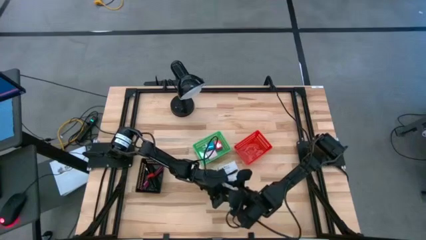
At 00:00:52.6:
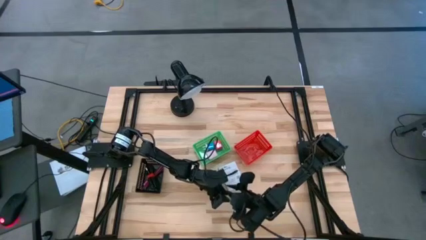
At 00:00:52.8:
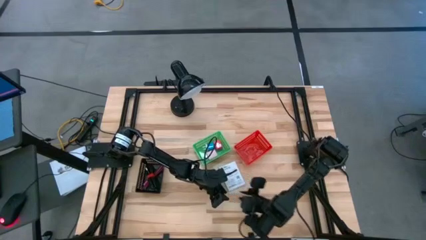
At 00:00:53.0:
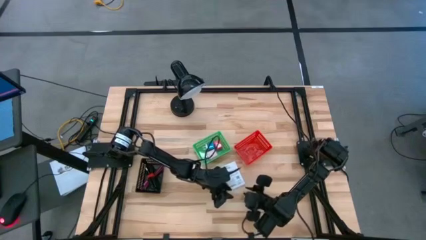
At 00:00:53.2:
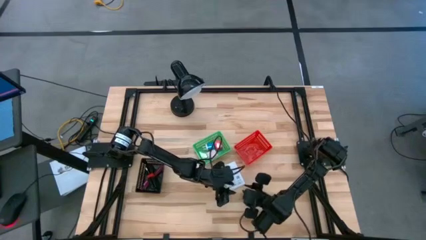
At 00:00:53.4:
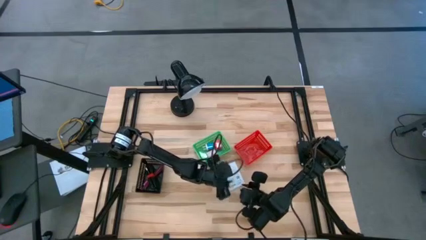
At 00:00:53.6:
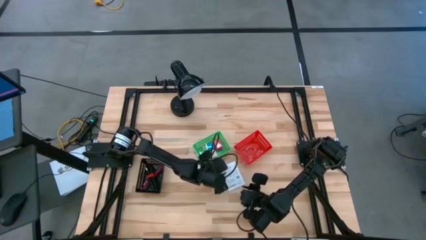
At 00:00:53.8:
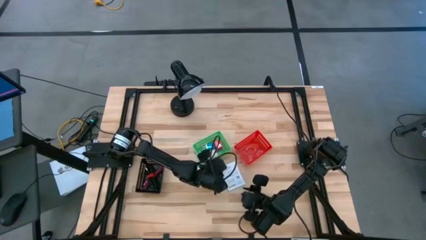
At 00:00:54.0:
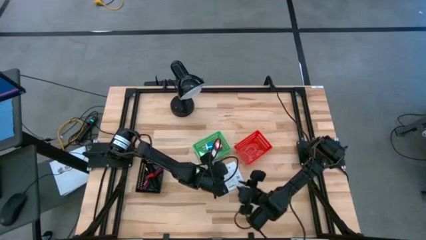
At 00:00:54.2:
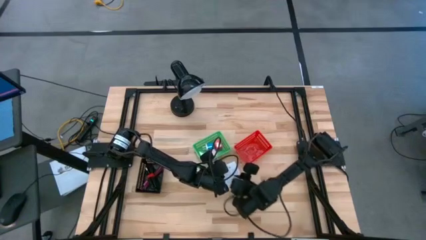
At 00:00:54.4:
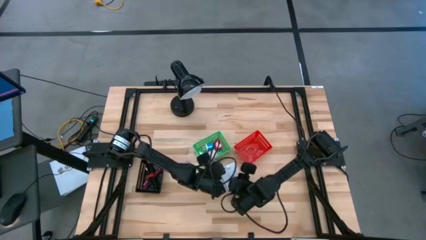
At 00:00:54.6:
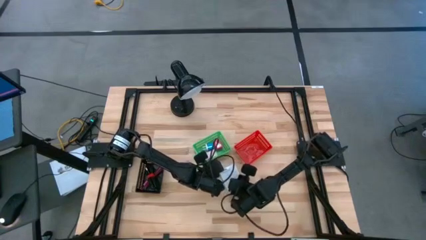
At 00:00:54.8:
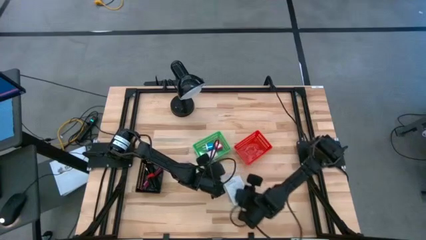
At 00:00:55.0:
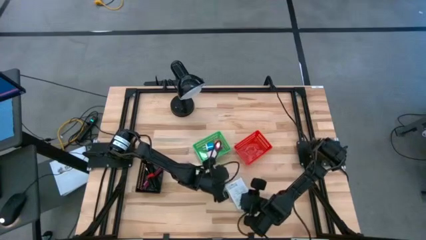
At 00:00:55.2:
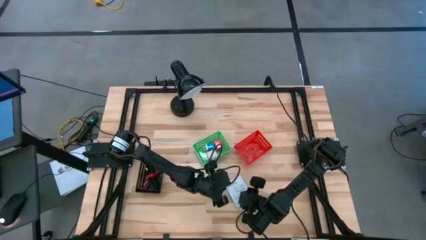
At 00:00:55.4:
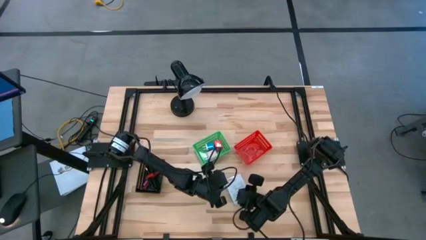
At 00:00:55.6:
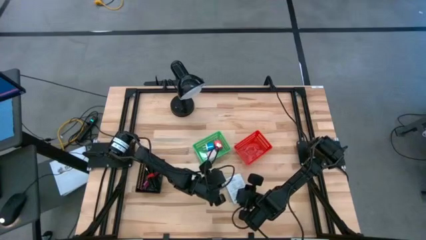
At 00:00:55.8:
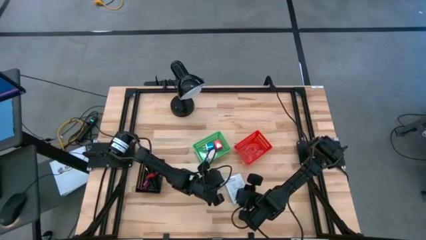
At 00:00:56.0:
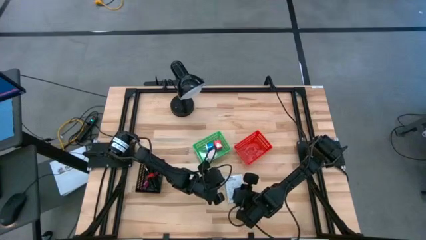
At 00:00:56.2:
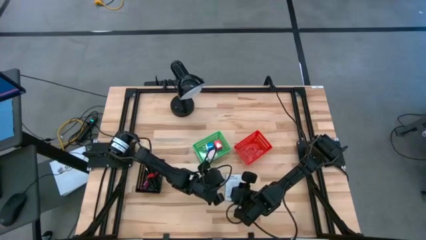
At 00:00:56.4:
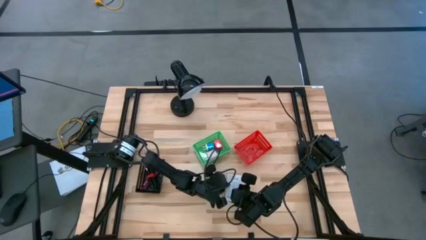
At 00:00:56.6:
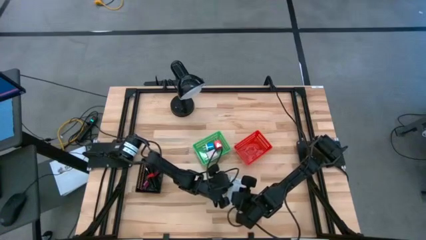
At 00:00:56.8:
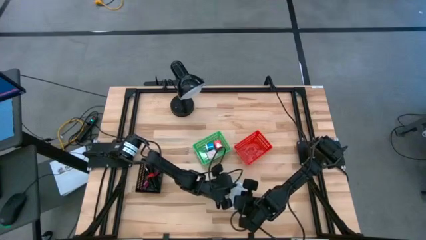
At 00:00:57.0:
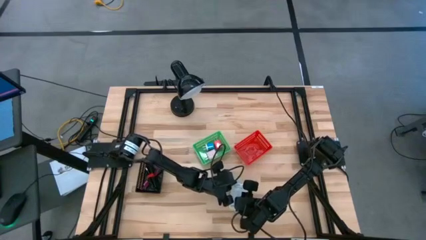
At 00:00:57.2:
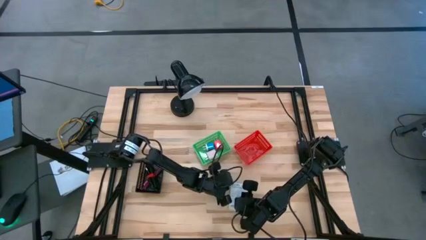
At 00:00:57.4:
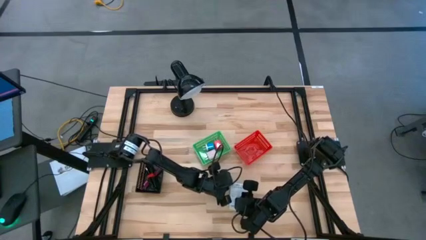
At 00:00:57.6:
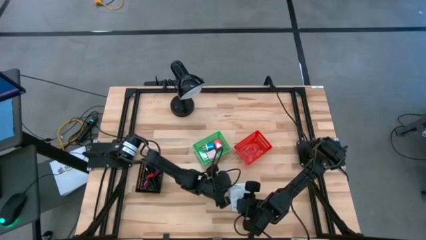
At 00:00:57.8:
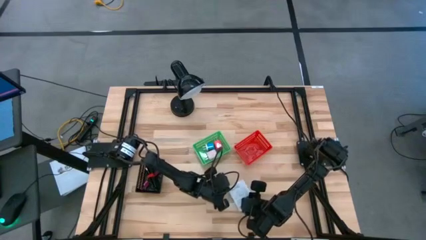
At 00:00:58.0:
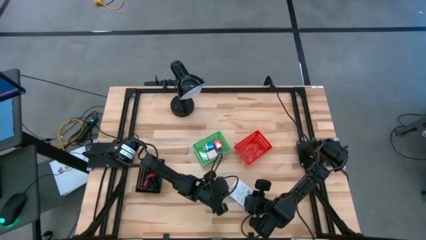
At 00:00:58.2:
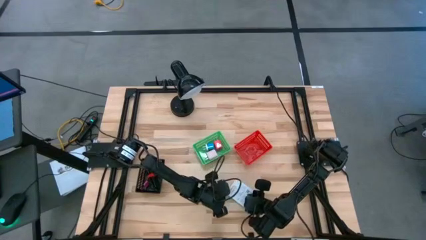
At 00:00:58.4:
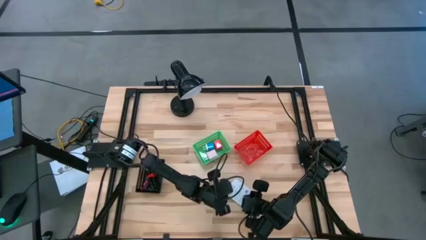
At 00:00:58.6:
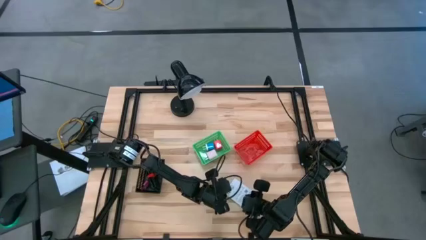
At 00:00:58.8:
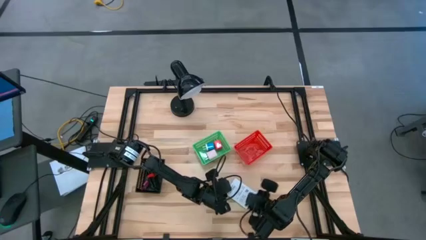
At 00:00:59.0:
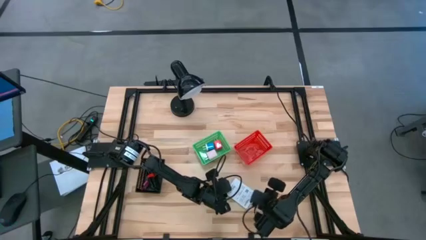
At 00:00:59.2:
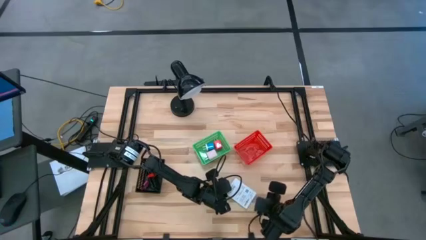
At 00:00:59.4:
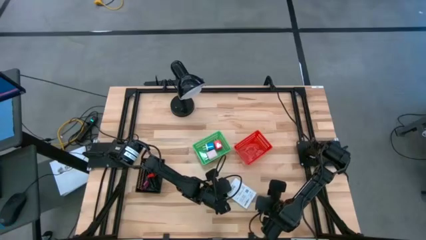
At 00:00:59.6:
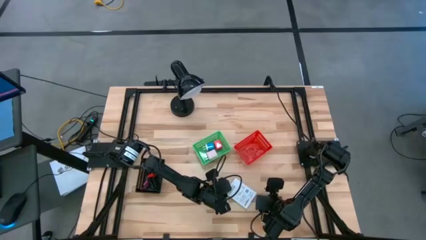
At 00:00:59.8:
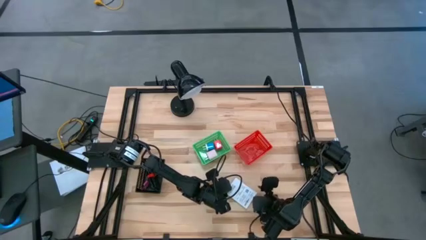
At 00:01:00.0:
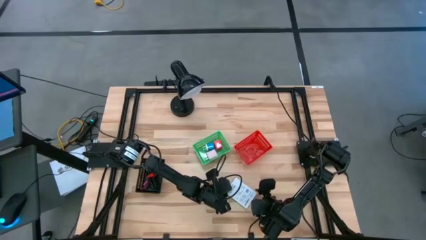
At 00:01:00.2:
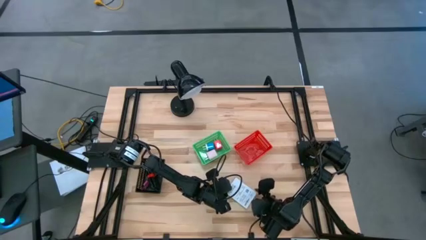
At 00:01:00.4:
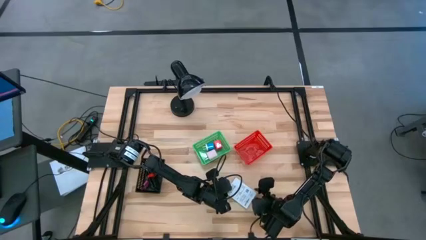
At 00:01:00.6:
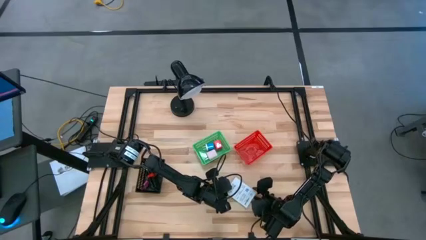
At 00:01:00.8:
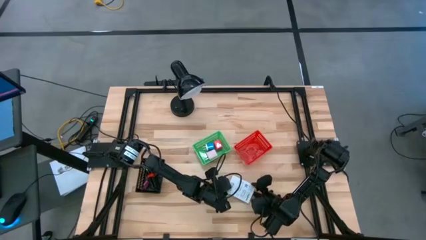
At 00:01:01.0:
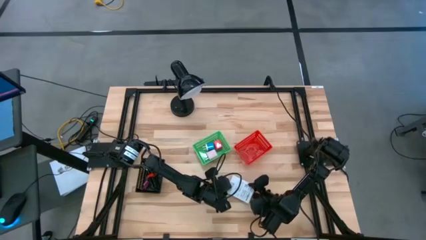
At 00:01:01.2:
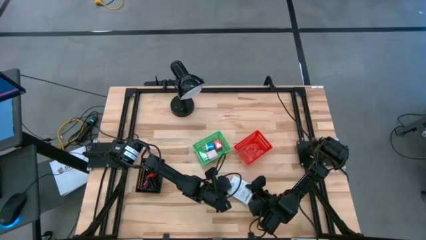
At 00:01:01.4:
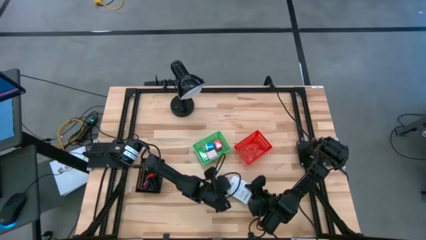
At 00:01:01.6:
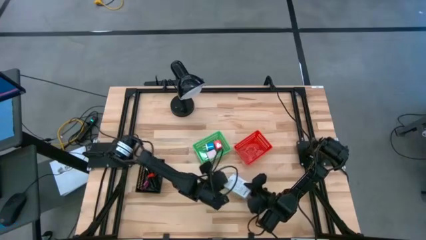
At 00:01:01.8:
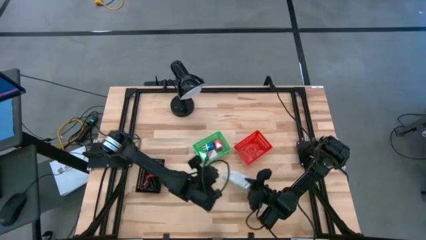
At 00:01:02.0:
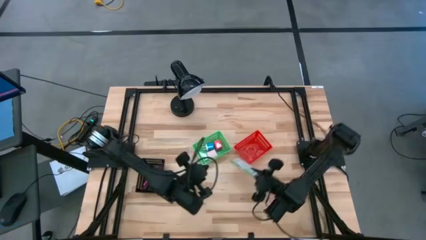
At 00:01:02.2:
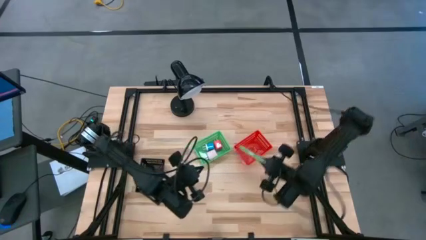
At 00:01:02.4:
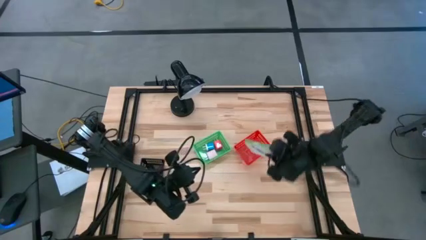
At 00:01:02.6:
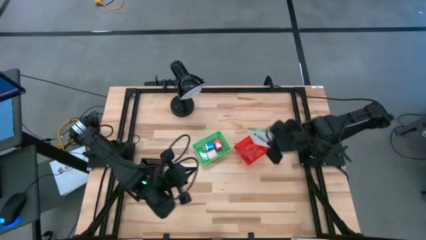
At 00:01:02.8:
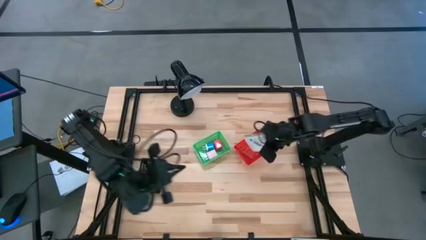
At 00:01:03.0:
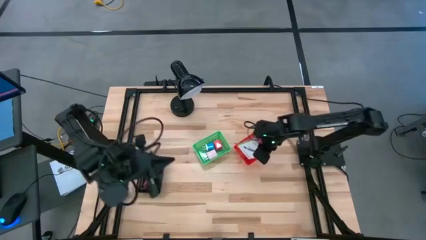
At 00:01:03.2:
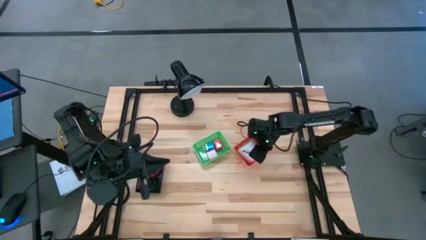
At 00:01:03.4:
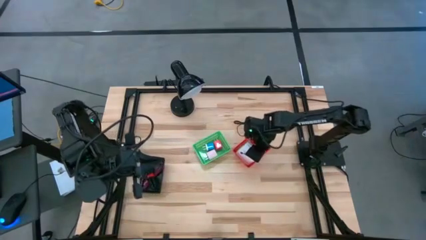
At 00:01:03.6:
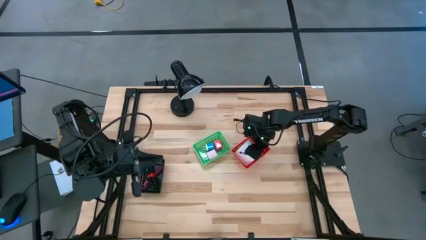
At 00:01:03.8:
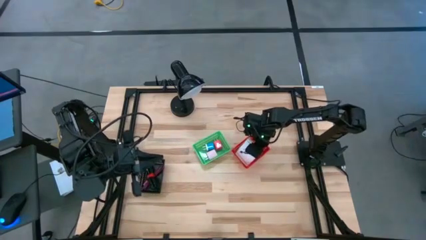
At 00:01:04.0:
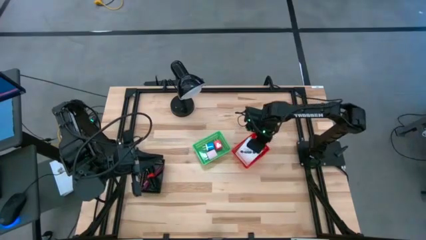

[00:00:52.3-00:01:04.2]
Task: Pick and place items into bin
Put the white card reader box into the red bin
